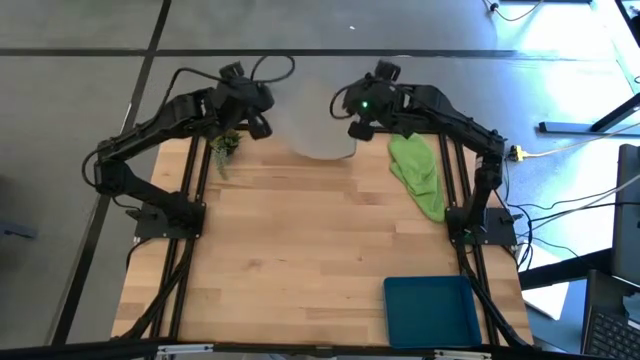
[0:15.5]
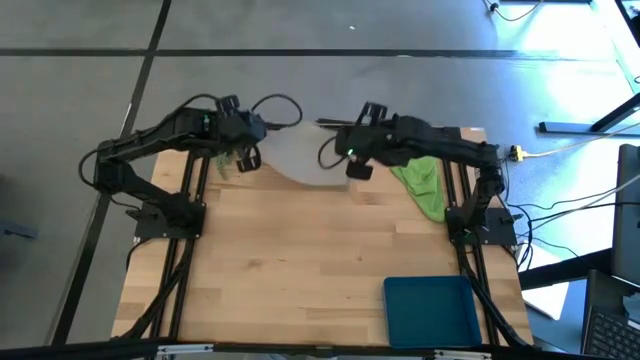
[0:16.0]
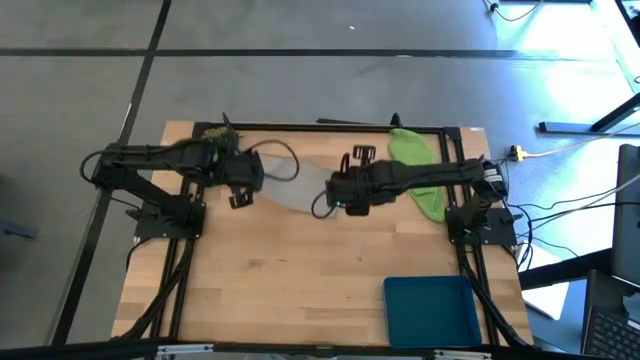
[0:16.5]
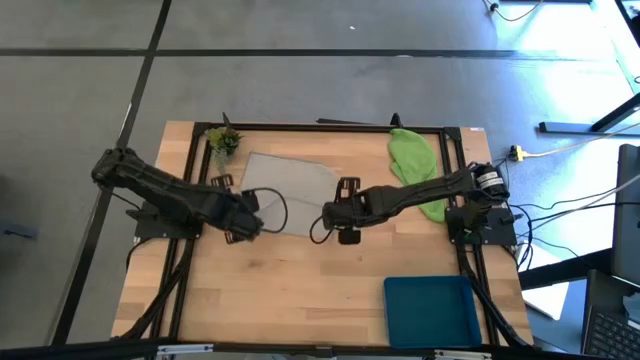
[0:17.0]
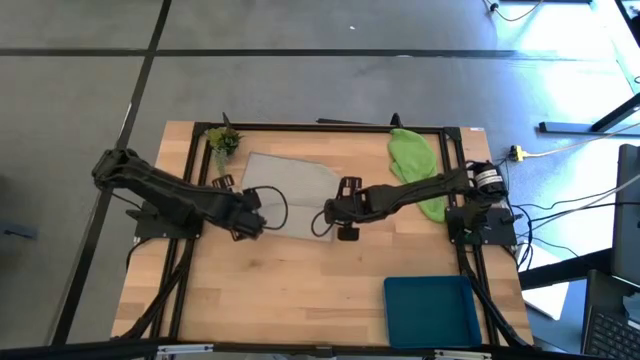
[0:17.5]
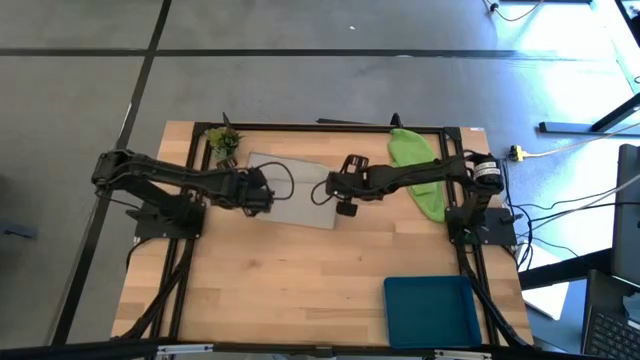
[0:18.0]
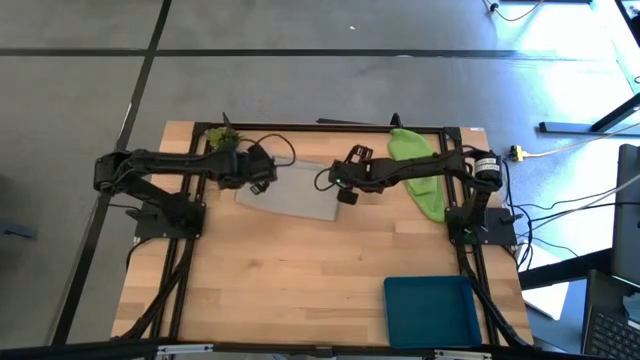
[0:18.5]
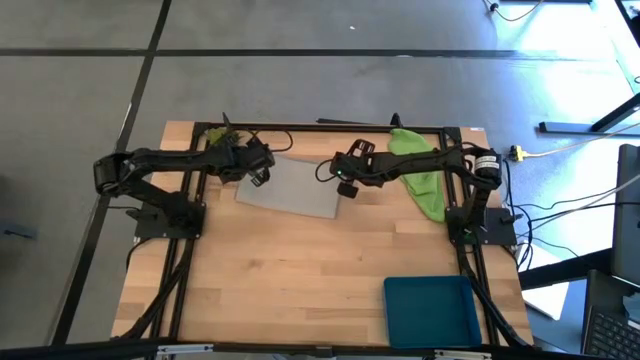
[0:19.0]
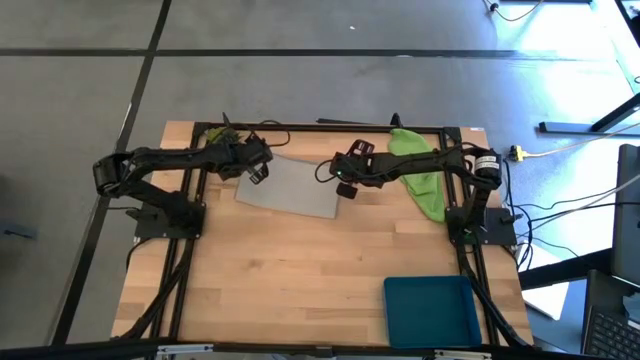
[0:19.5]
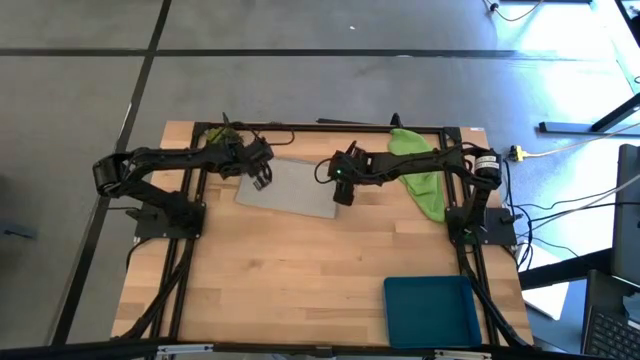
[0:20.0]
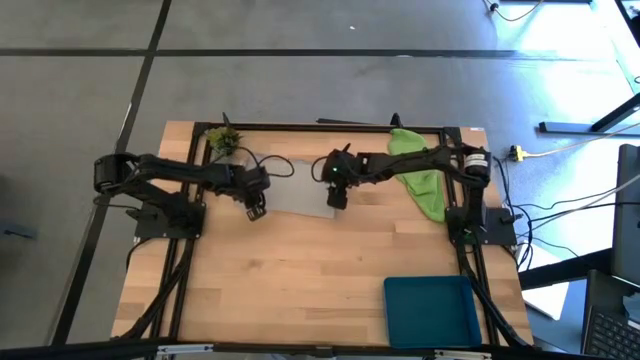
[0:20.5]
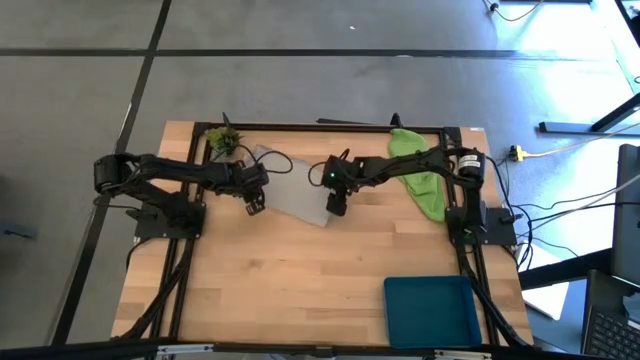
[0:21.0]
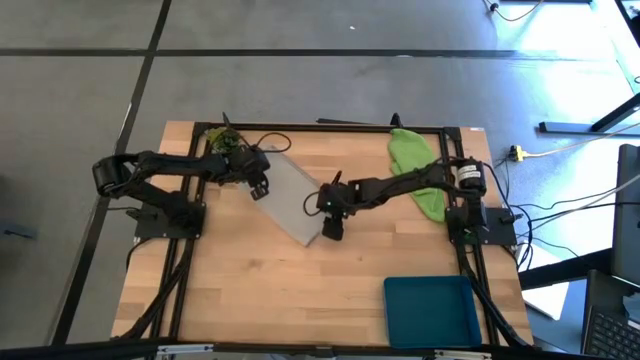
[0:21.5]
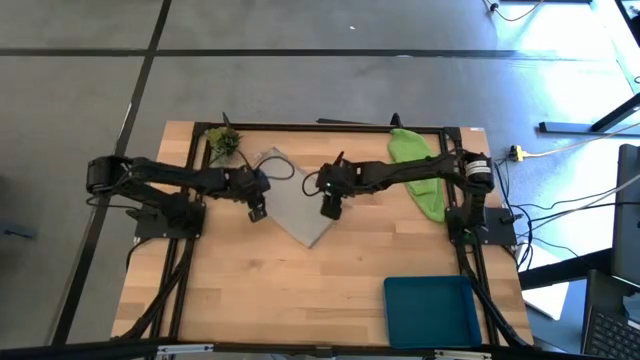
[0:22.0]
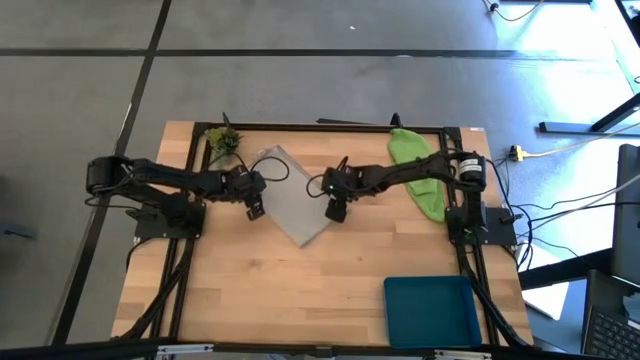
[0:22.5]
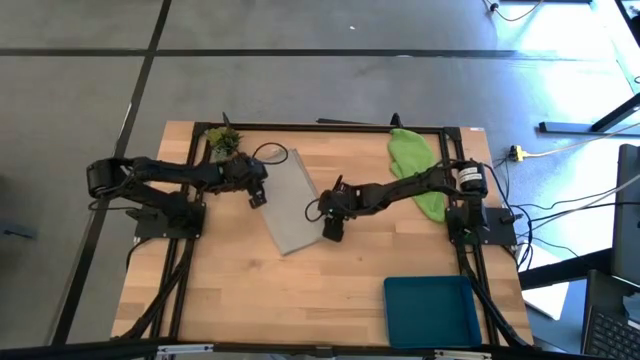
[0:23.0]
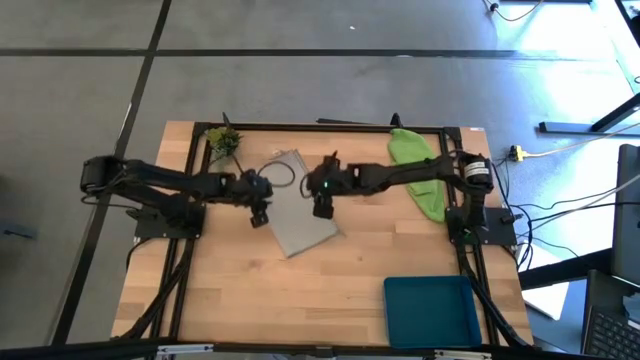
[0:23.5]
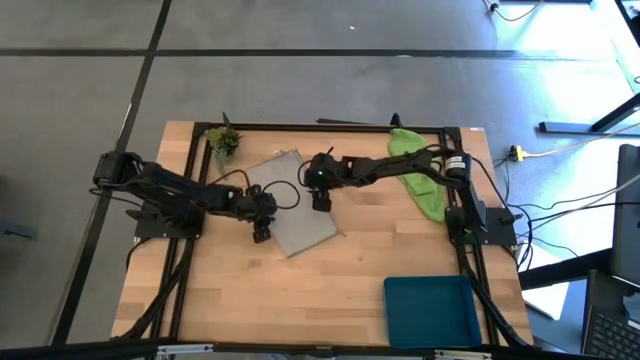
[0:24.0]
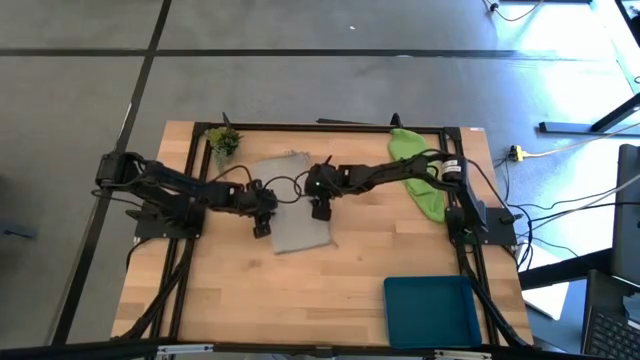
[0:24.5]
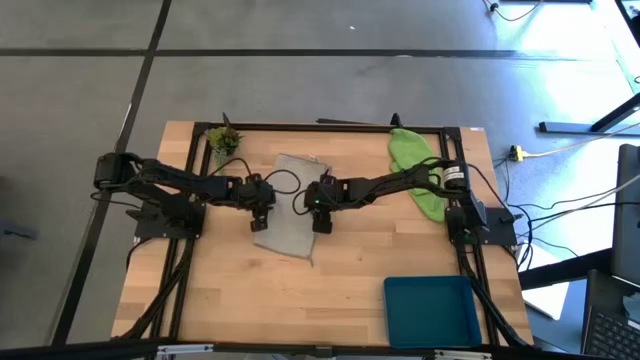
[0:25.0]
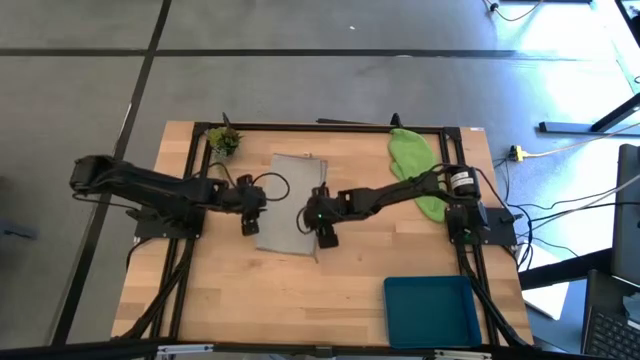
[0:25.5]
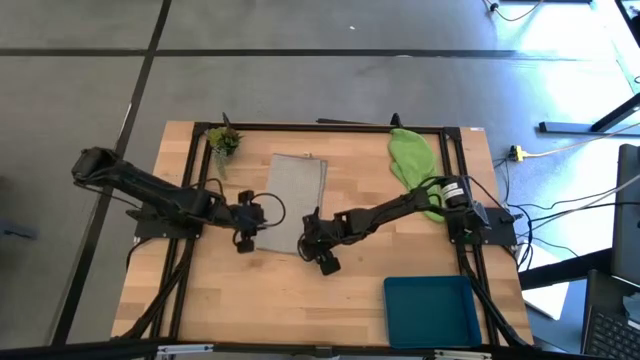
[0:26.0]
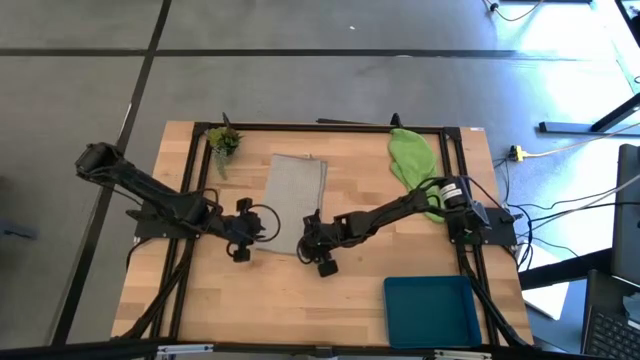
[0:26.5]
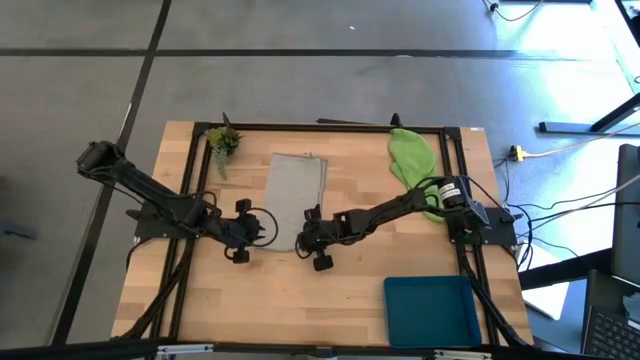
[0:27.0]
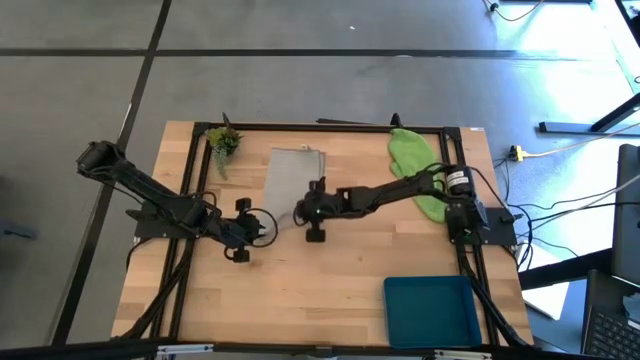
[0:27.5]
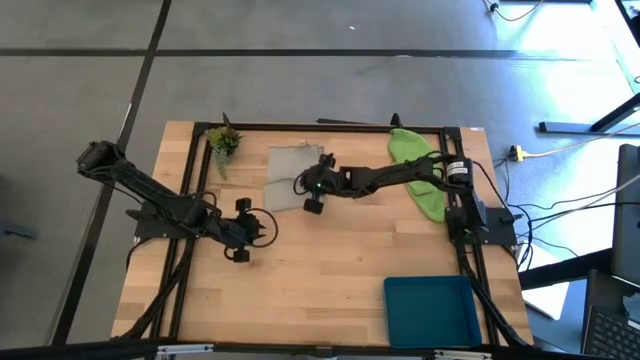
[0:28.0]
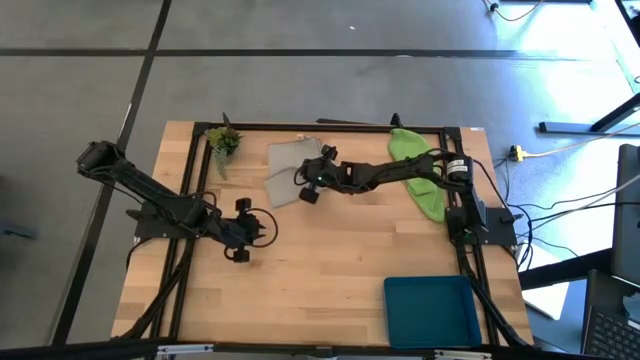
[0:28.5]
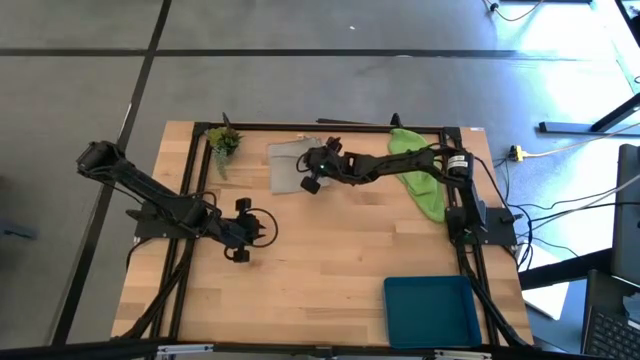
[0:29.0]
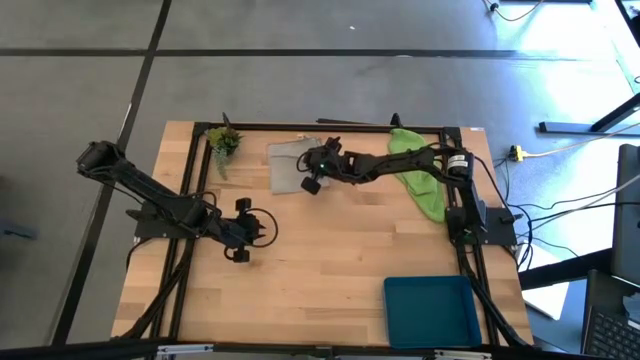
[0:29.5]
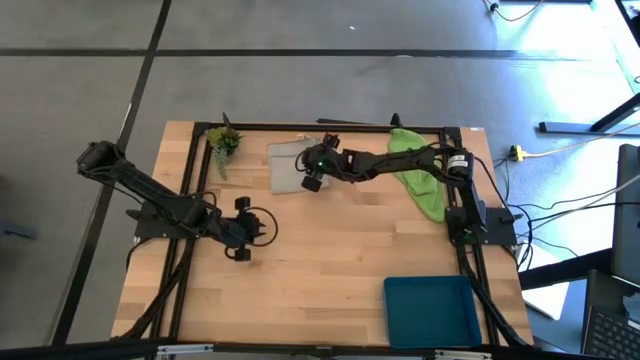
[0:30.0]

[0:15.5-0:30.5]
Task: Roll microfiber towels into tight, uniform cylinder then place into a basket
Fold the gray towel

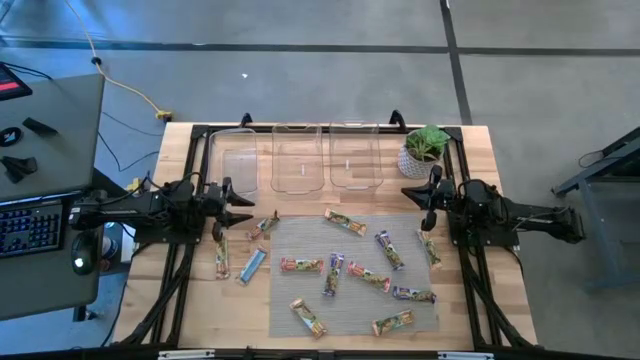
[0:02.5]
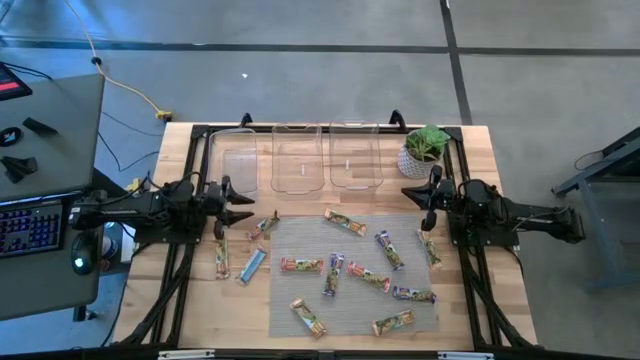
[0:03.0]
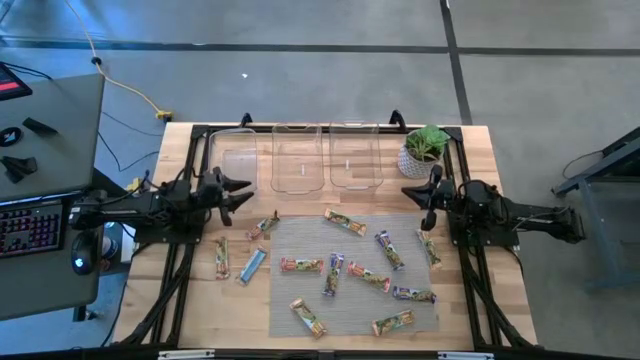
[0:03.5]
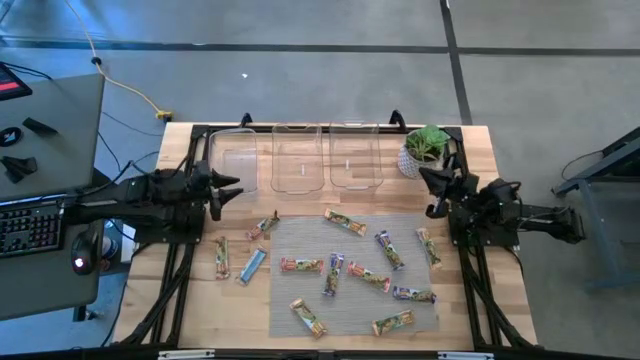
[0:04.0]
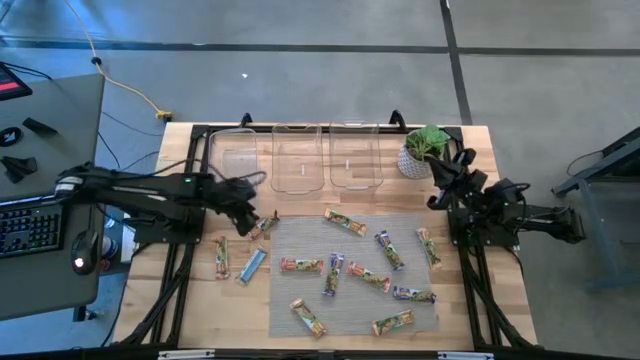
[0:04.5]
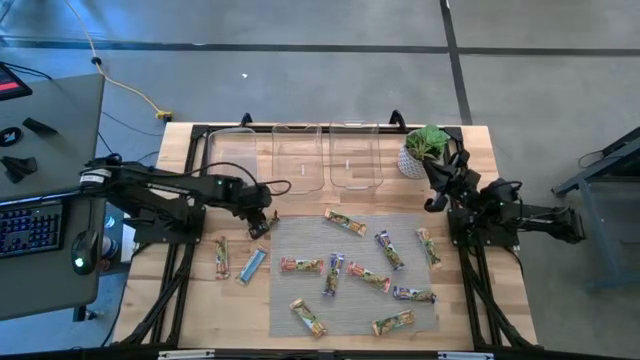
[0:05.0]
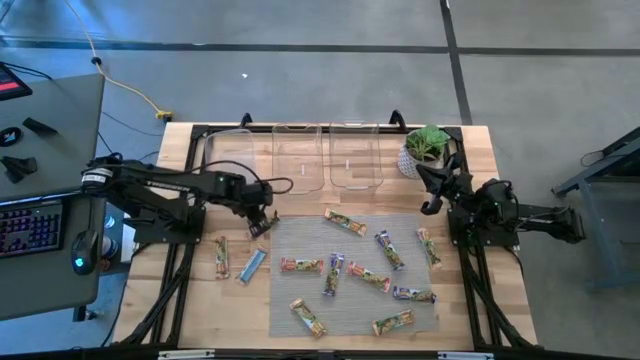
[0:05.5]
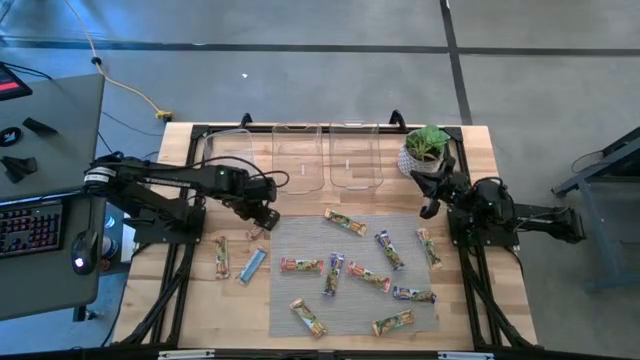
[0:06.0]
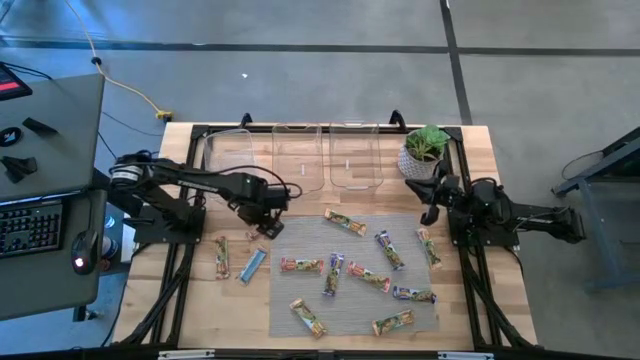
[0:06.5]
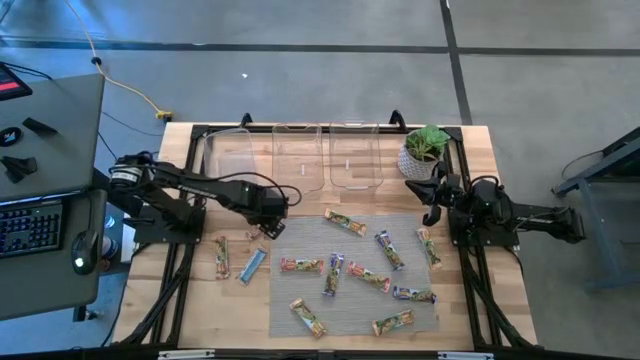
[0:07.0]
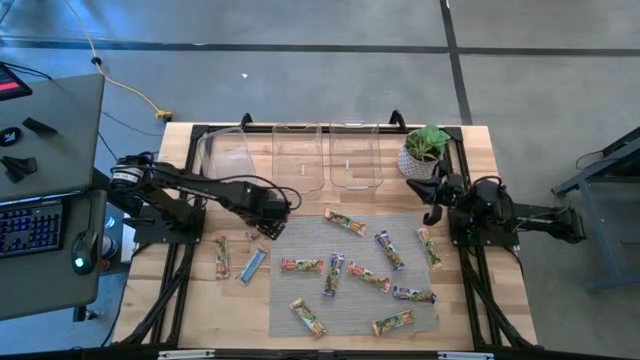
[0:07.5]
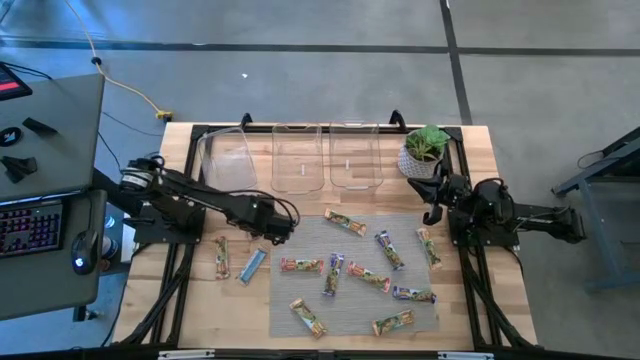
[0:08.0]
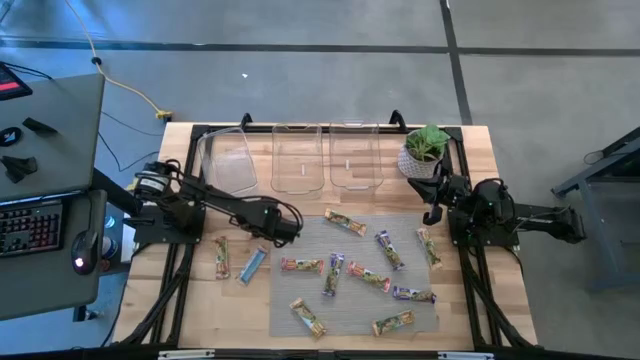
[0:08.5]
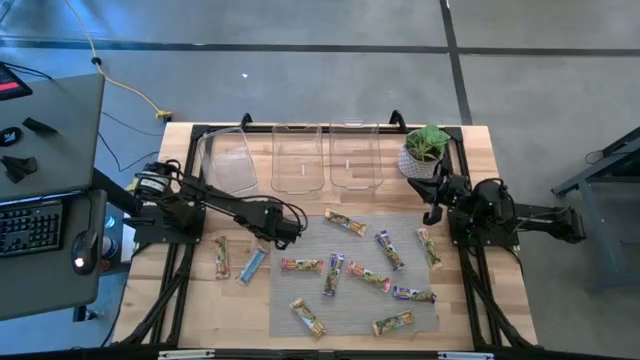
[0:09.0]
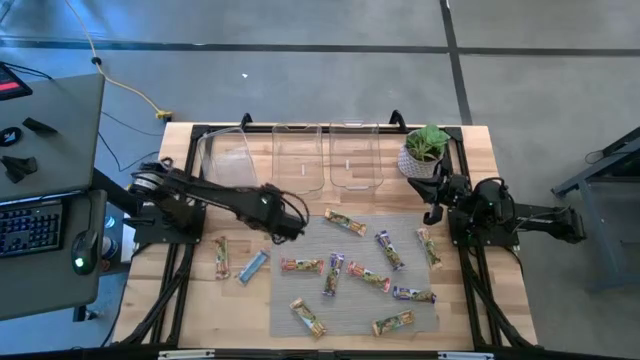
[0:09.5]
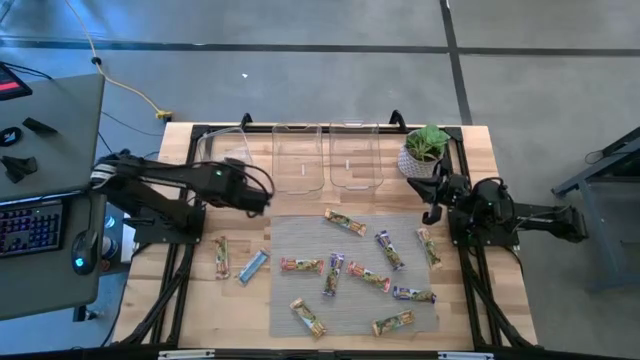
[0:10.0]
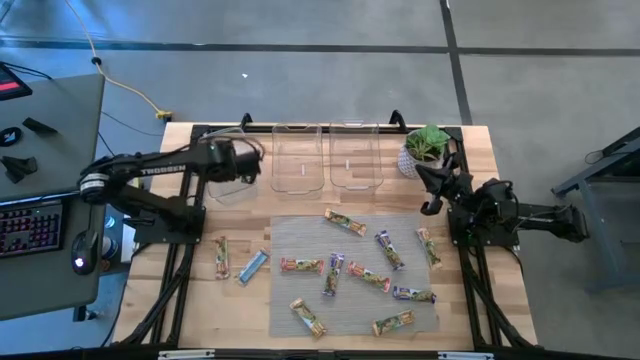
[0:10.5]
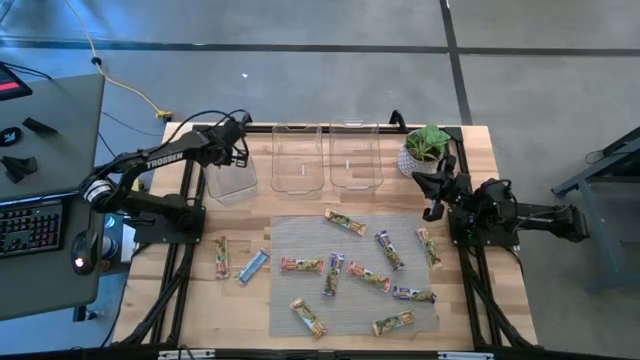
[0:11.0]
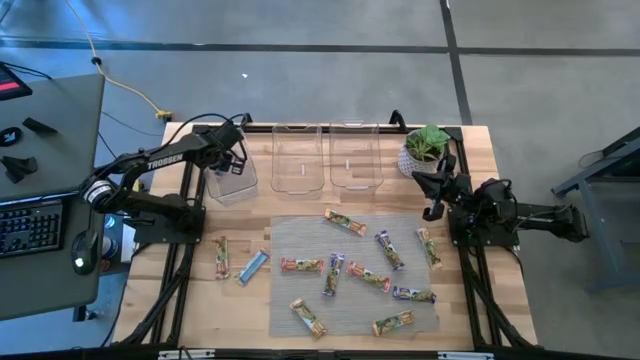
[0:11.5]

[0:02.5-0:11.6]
Task: Pick and place Granola Bars by type
Put the red granola bar into the left transparent bin
